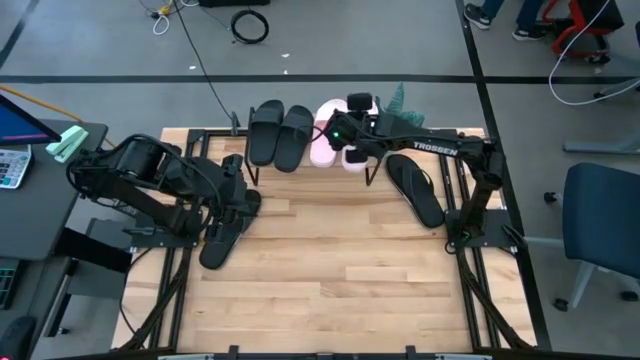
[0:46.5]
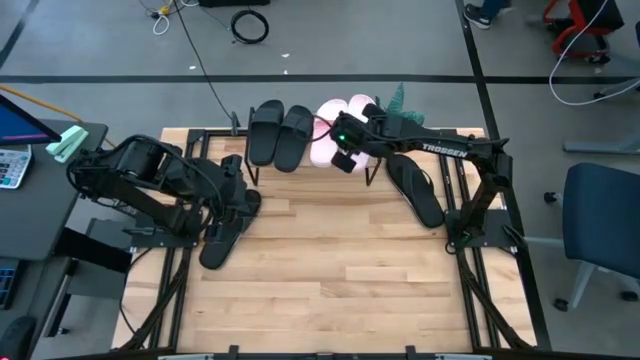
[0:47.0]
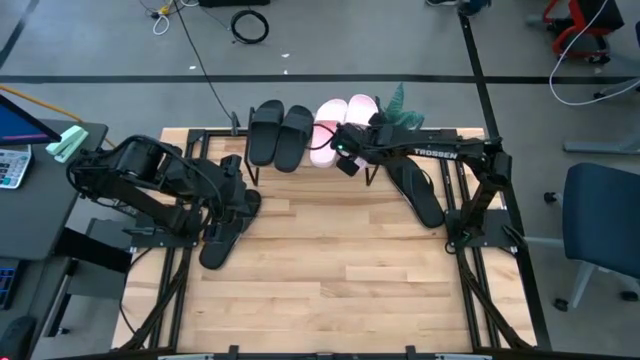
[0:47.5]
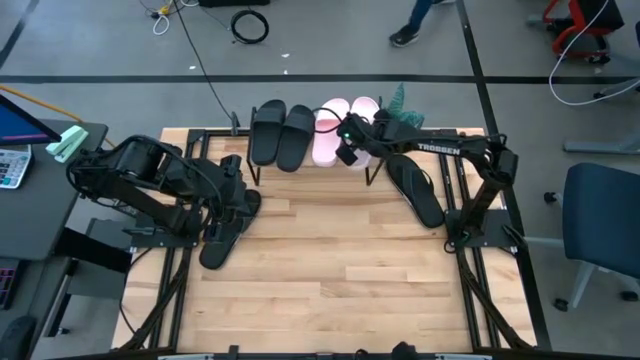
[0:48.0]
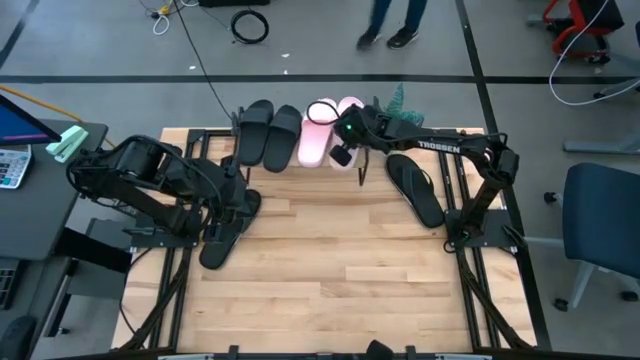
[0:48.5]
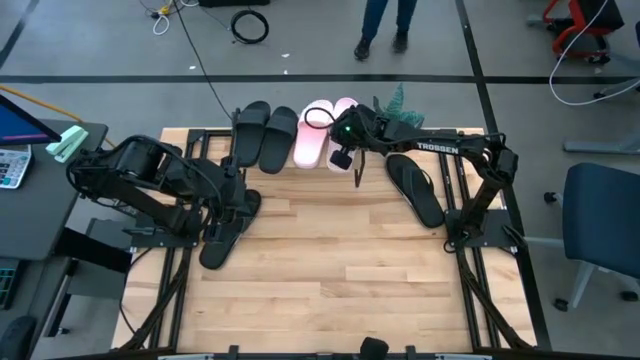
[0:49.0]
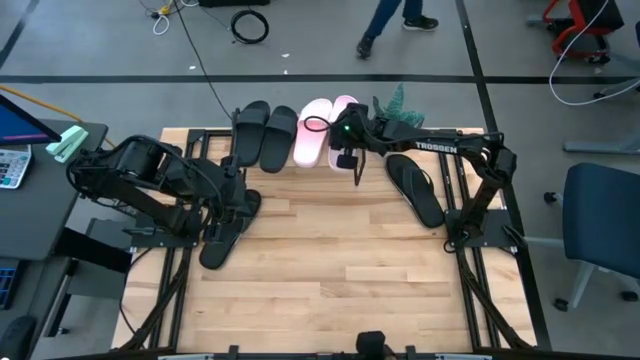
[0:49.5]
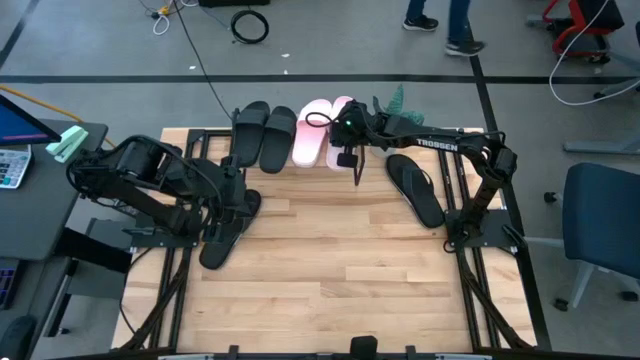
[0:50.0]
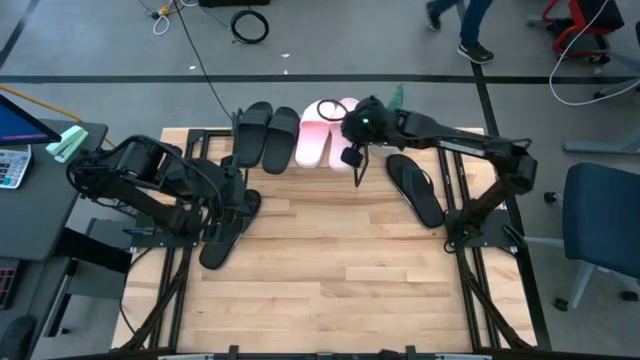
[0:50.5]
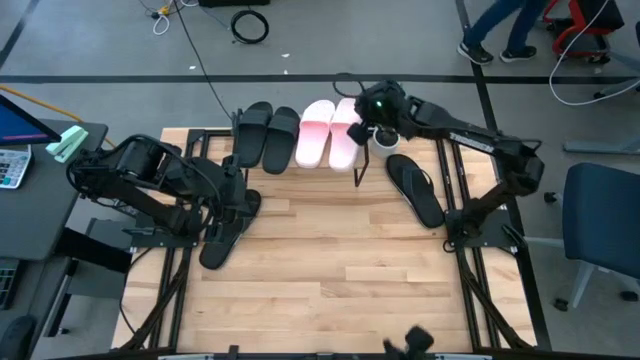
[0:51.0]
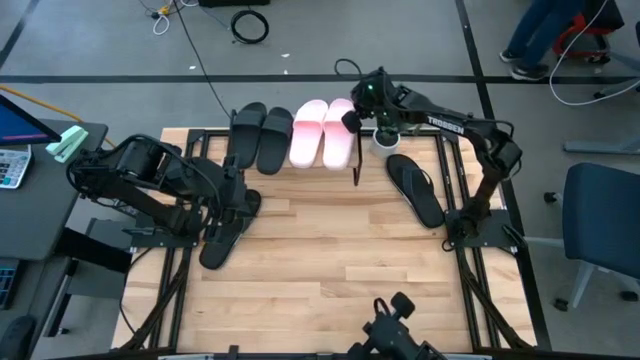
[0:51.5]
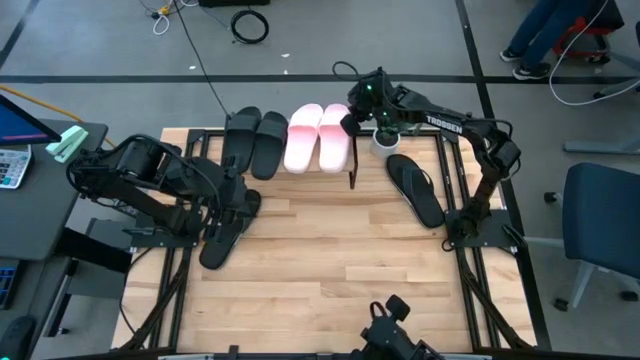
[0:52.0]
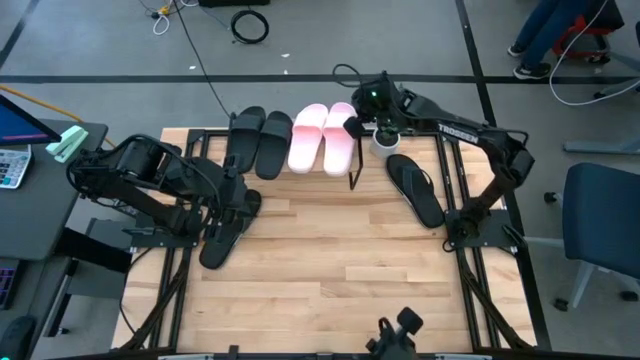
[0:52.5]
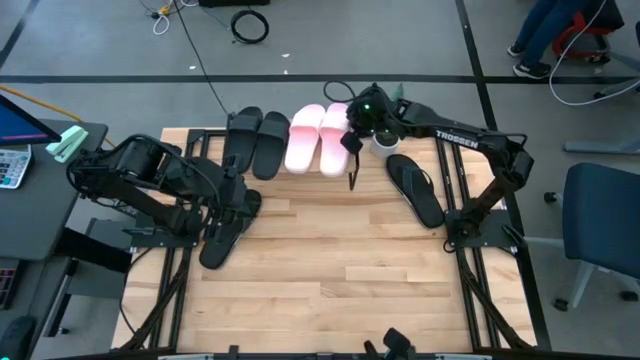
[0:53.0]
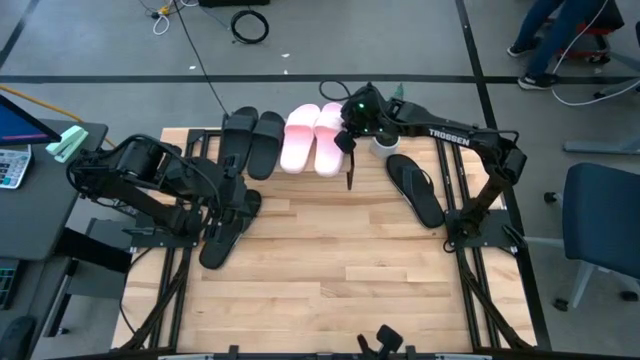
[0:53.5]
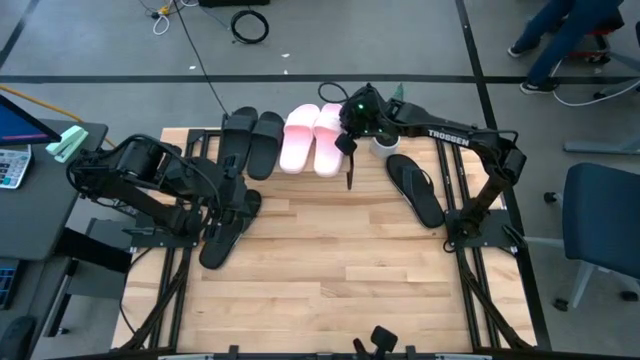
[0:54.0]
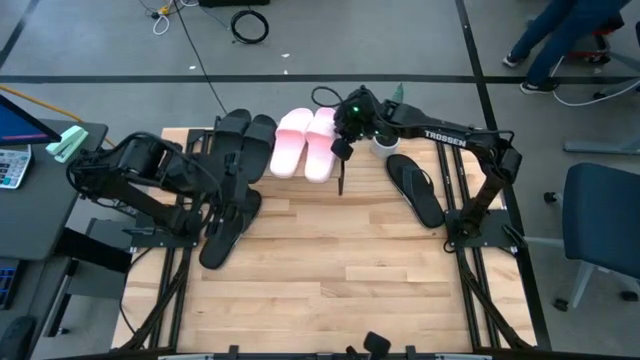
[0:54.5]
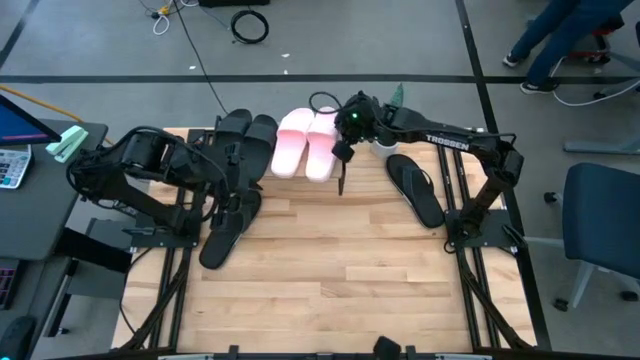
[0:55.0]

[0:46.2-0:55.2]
Task: Pick and place slides into the shelf
Adjust the shelf

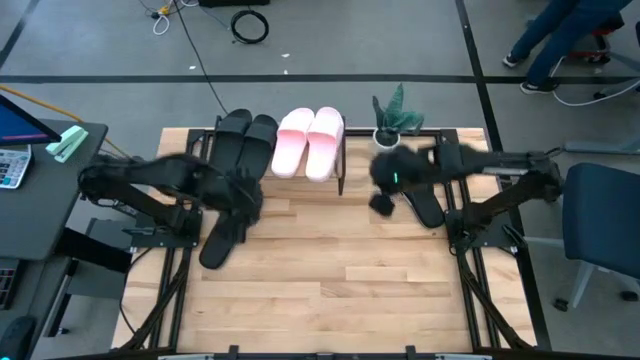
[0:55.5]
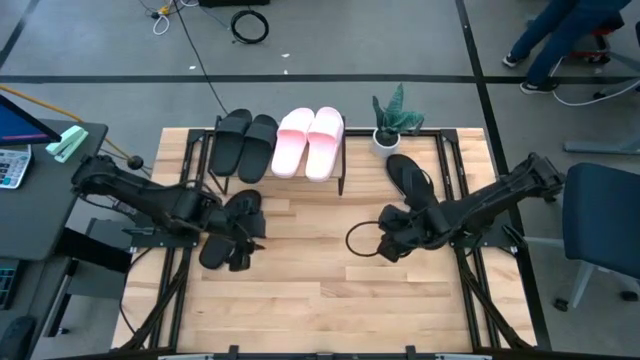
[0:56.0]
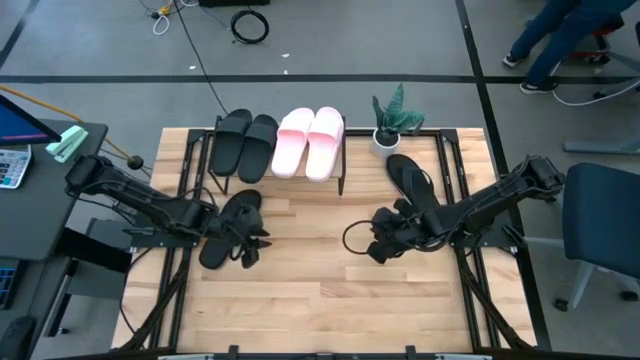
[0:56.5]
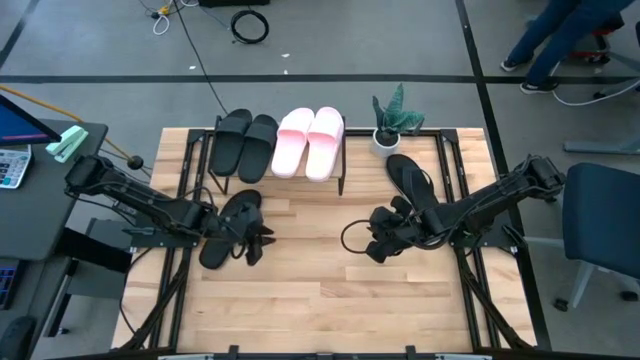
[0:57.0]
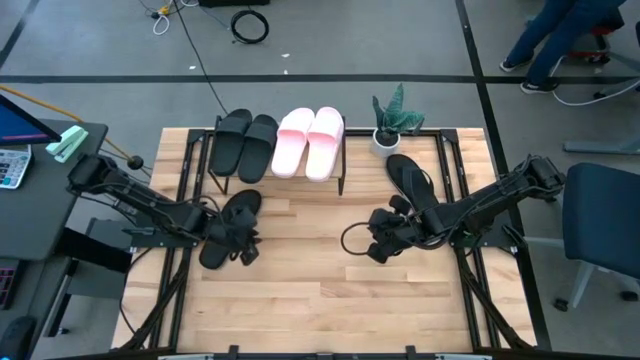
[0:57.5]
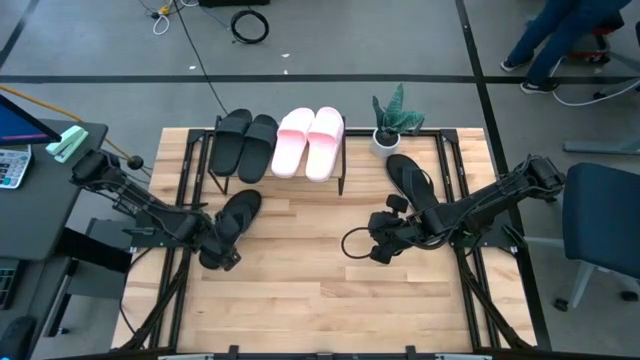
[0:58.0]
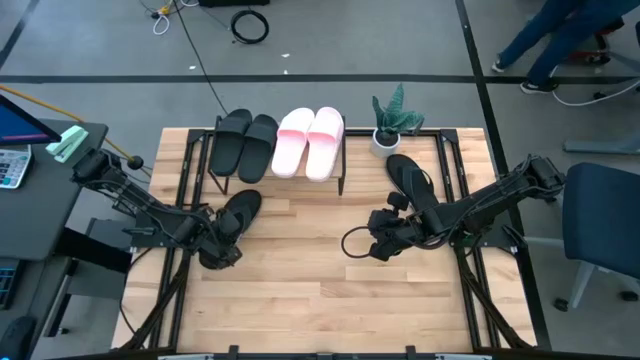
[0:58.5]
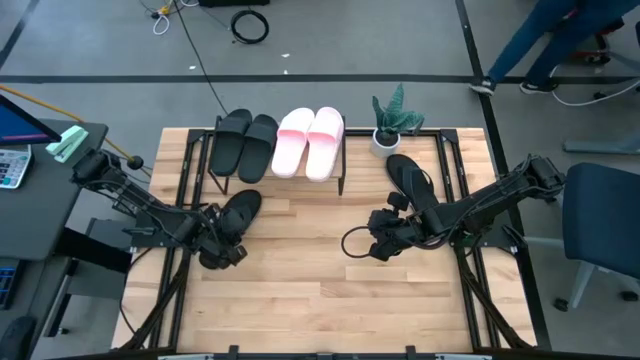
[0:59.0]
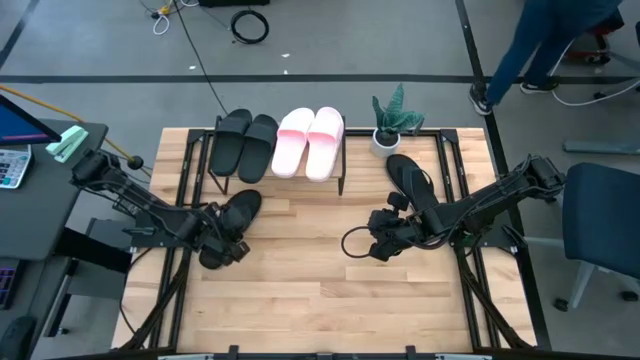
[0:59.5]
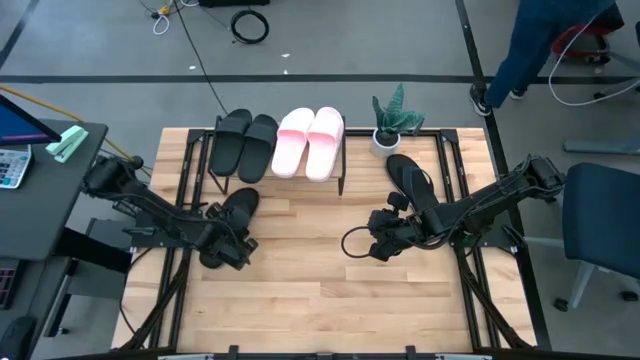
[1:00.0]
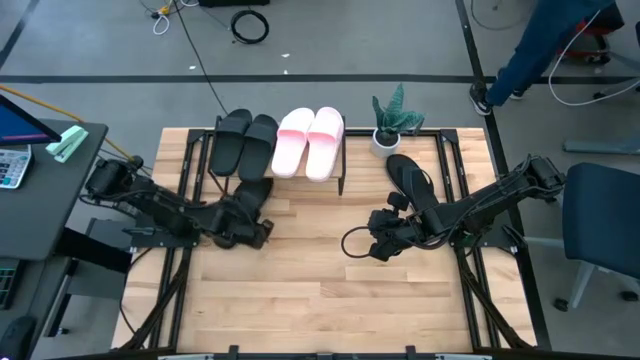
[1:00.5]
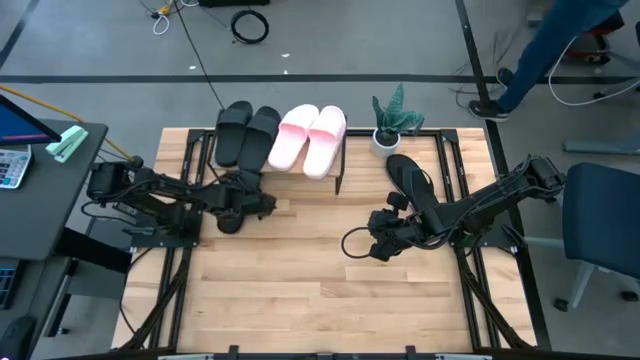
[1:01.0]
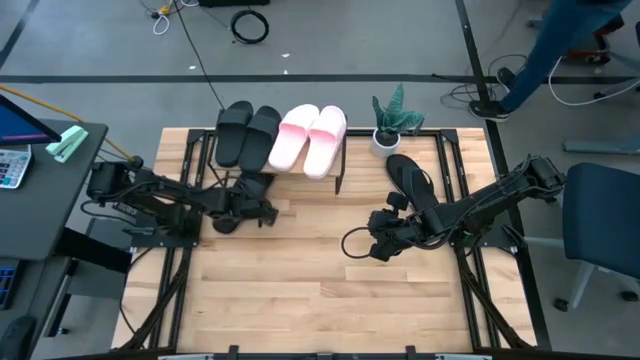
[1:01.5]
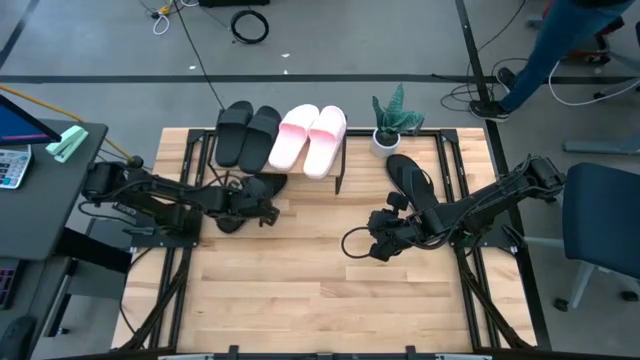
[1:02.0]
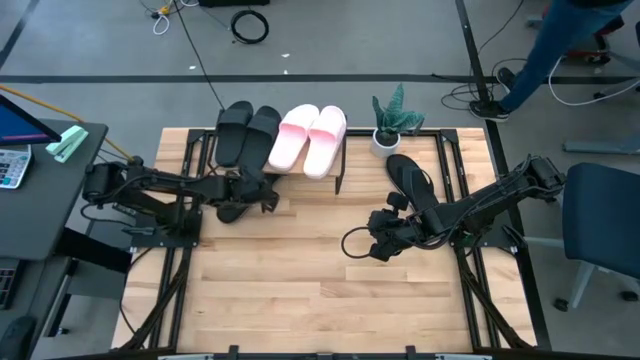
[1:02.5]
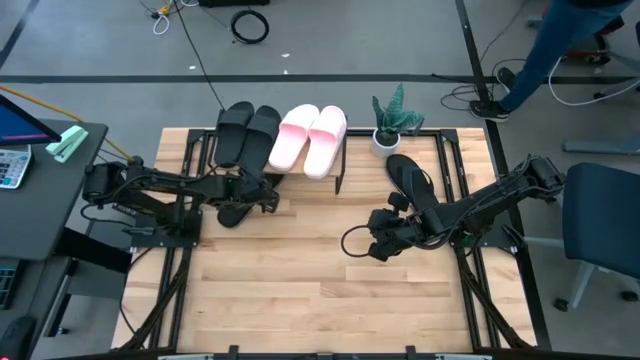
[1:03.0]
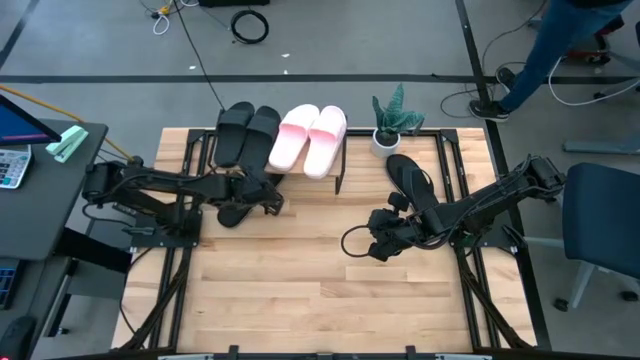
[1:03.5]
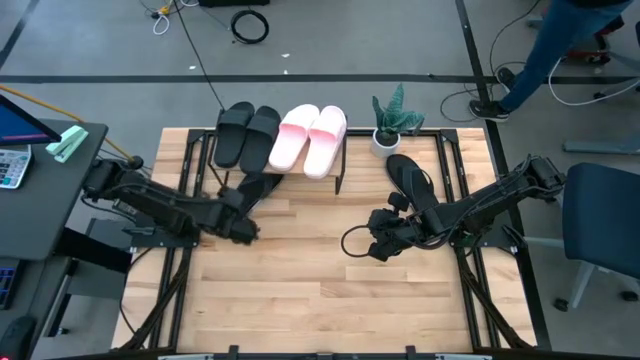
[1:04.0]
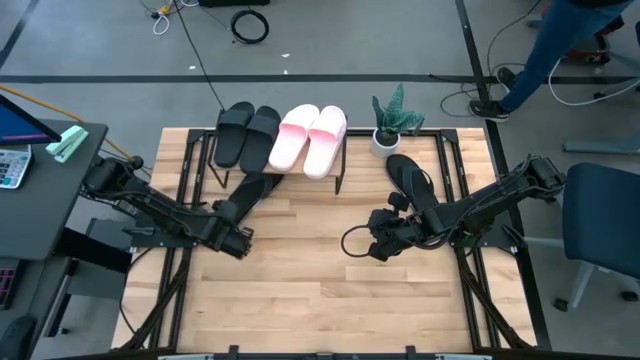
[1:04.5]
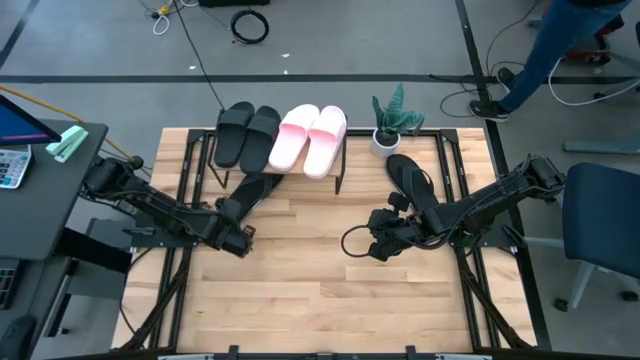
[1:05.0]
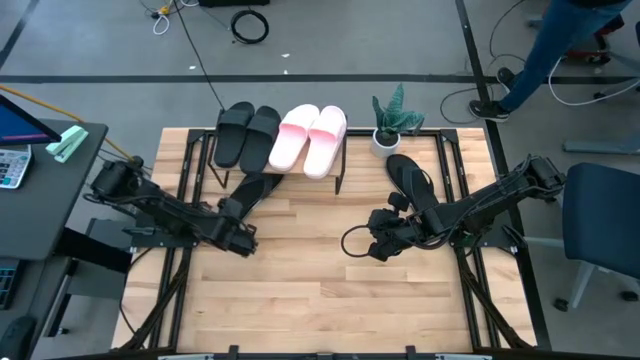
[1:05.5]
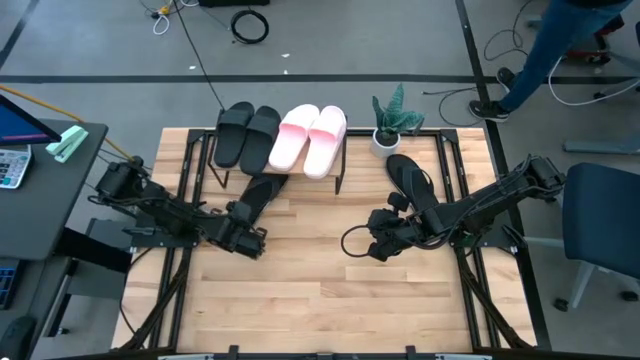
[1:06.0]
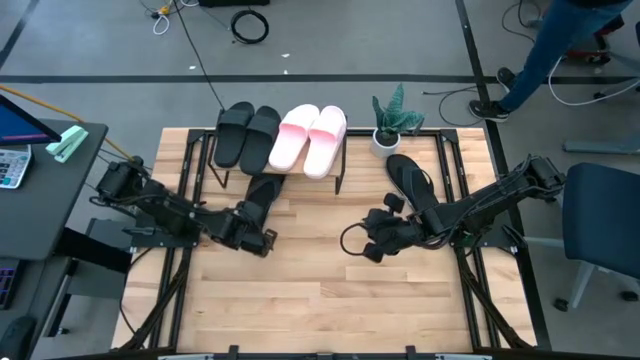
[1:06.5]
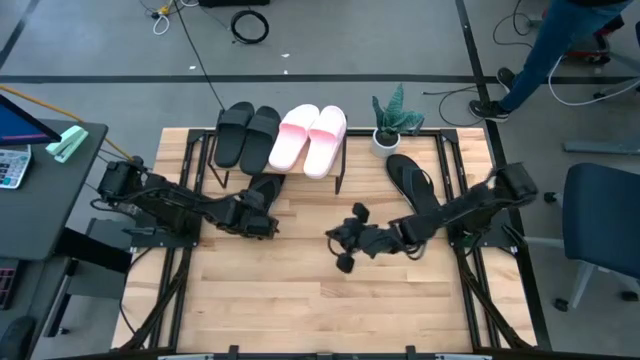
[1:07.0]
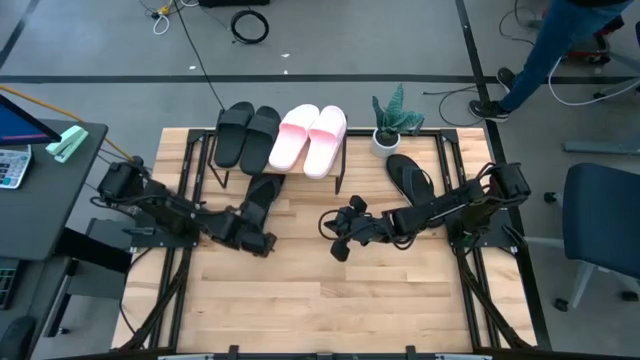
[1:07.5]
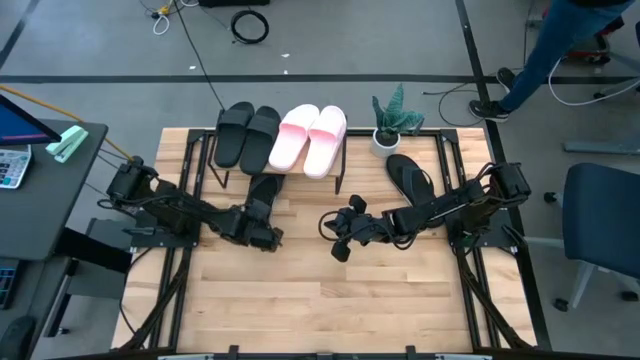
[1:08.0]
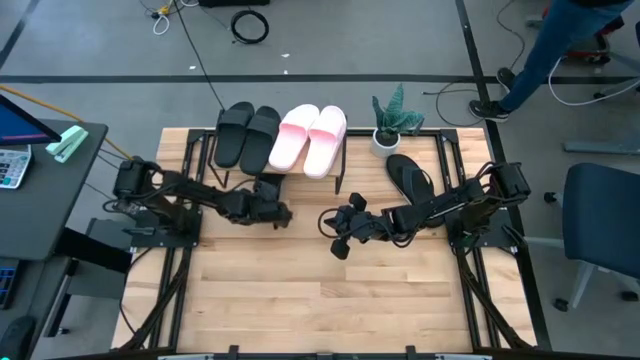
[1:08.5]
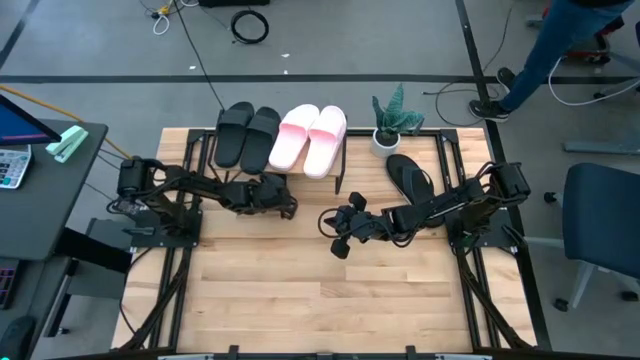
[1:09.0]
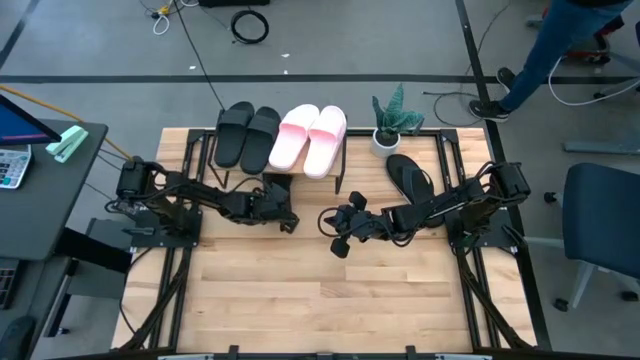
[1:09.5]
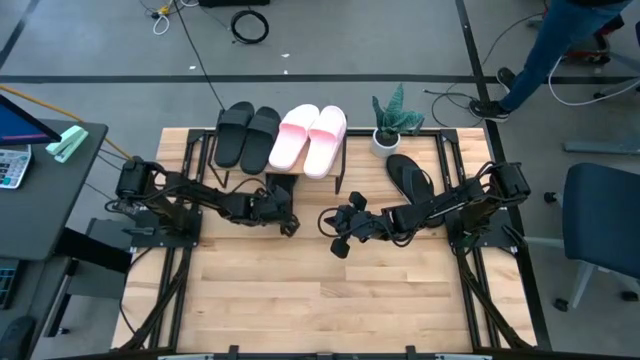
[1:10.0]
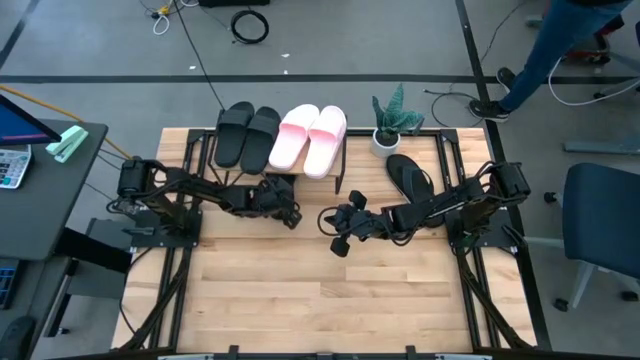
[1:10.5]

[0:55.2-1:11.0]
Put the left black slipper under the shelf
